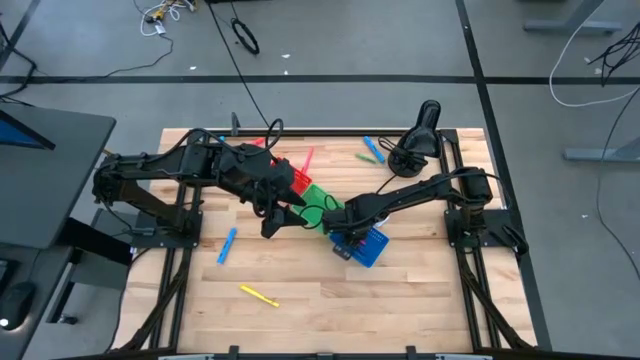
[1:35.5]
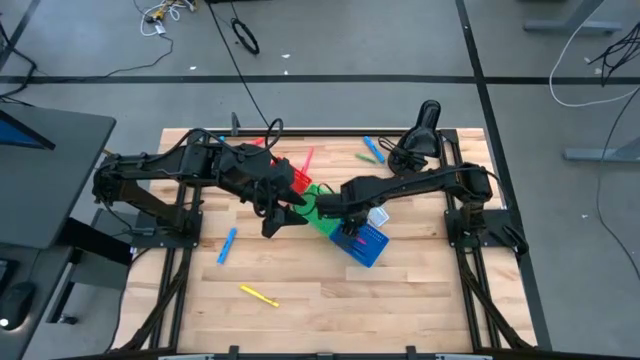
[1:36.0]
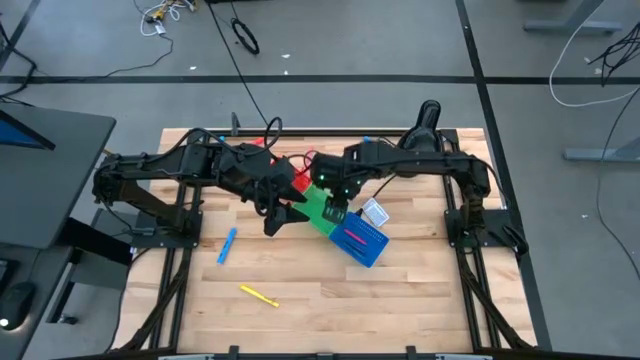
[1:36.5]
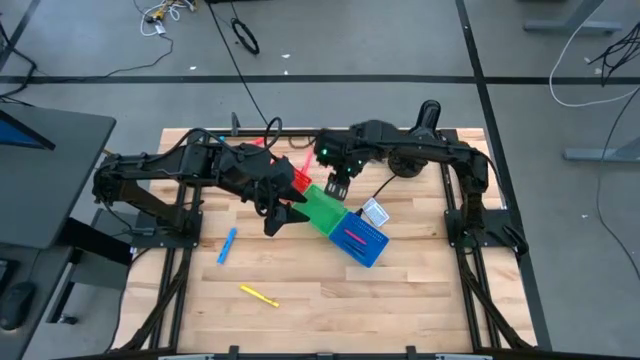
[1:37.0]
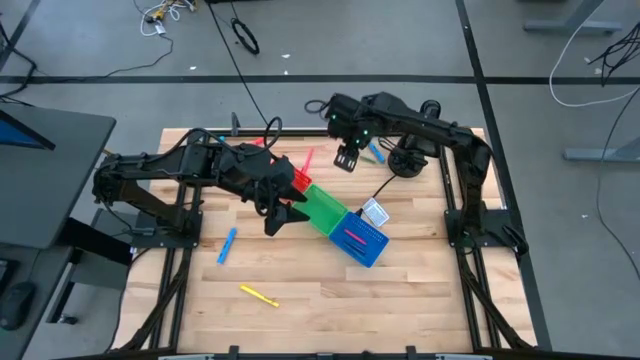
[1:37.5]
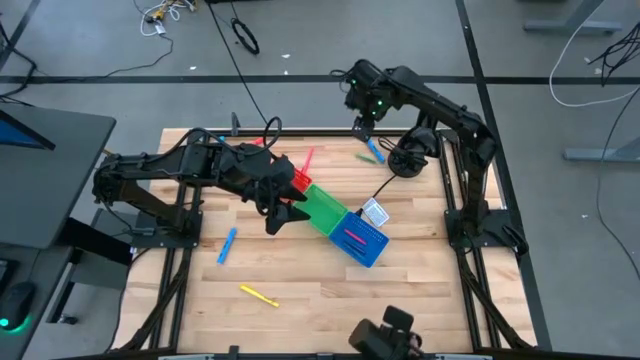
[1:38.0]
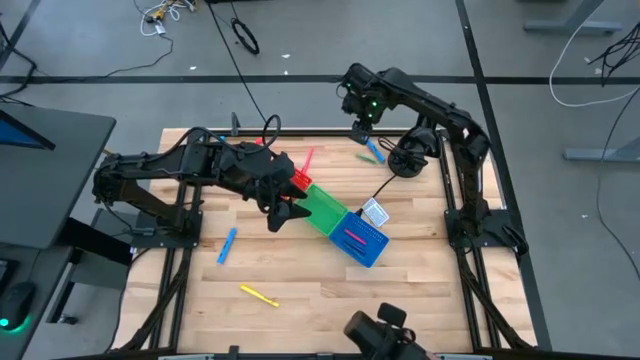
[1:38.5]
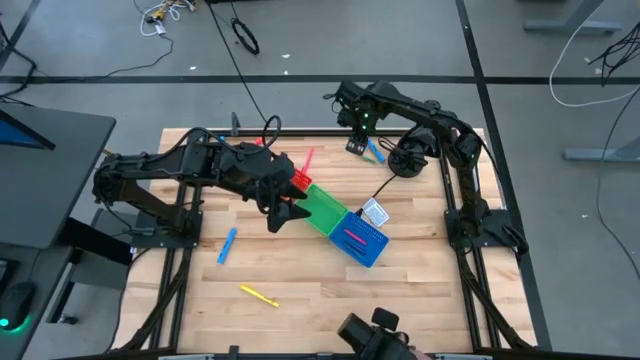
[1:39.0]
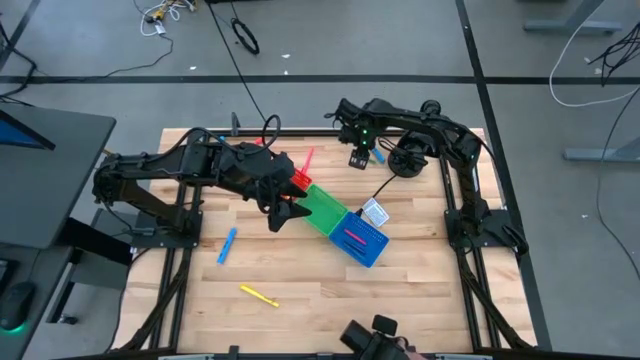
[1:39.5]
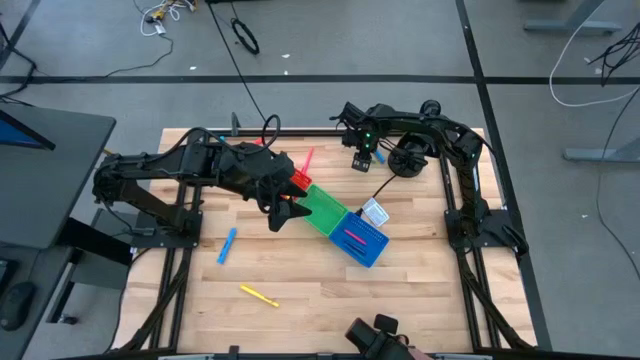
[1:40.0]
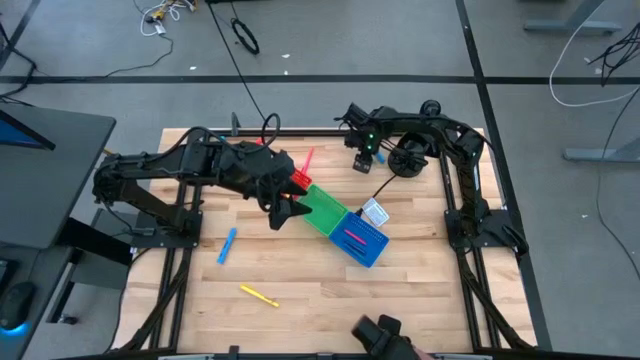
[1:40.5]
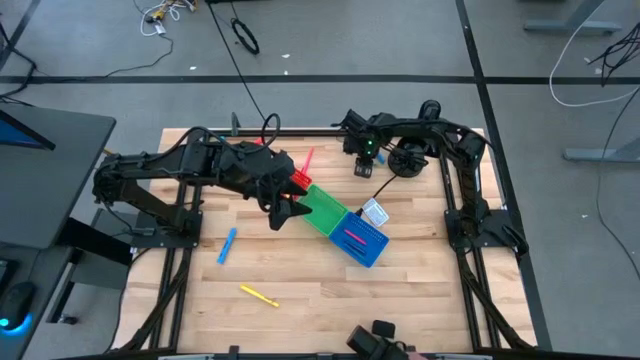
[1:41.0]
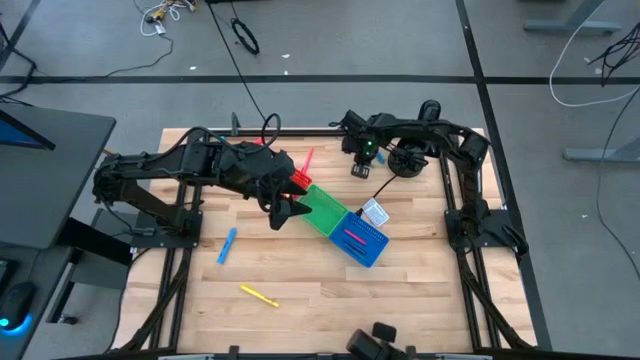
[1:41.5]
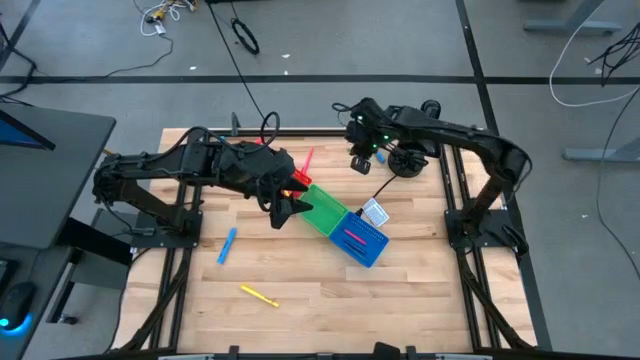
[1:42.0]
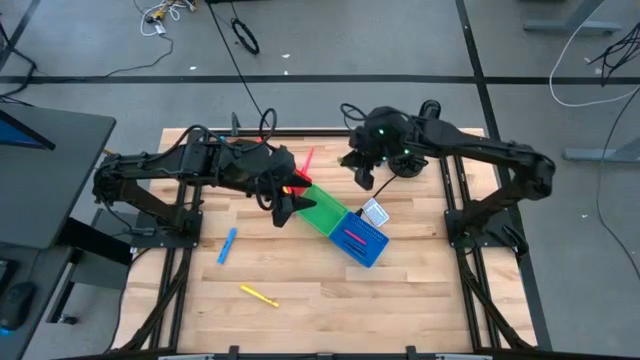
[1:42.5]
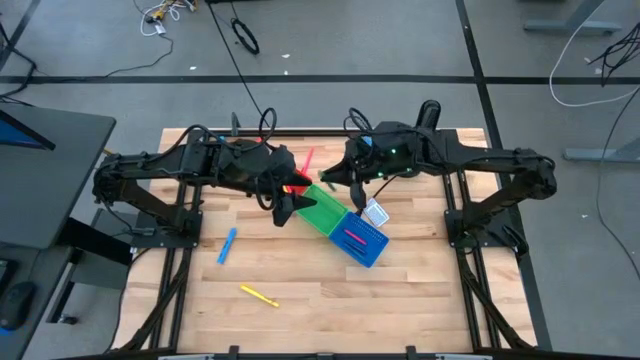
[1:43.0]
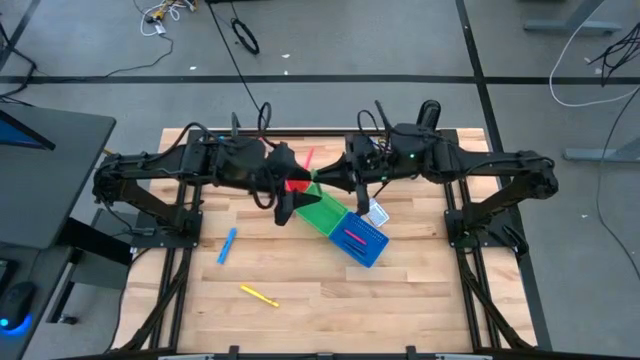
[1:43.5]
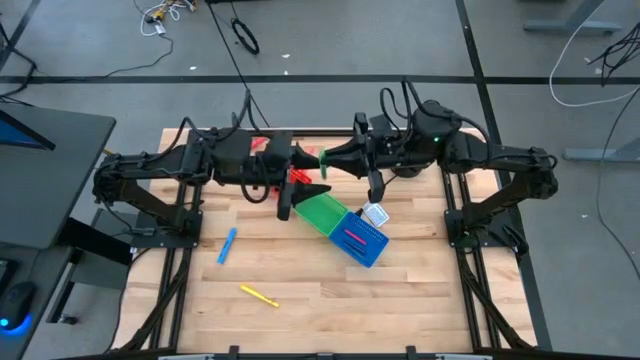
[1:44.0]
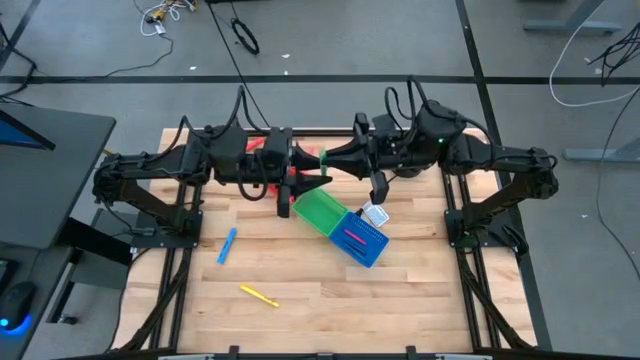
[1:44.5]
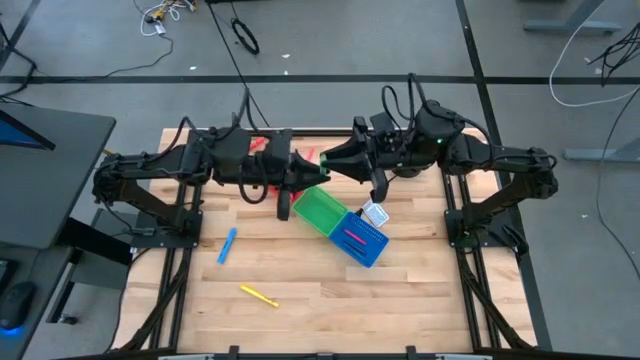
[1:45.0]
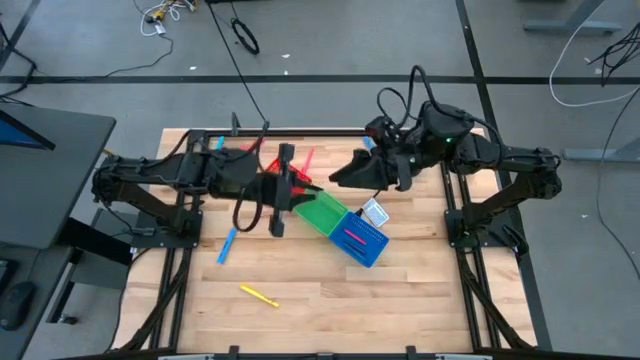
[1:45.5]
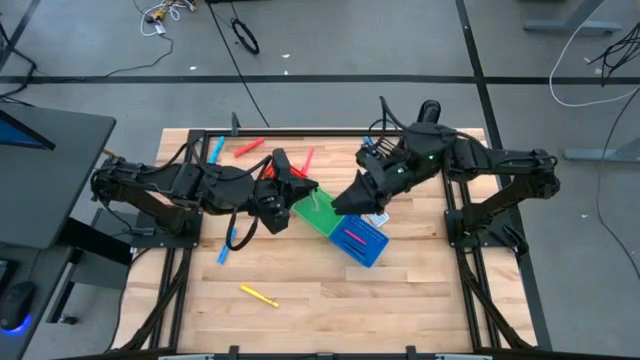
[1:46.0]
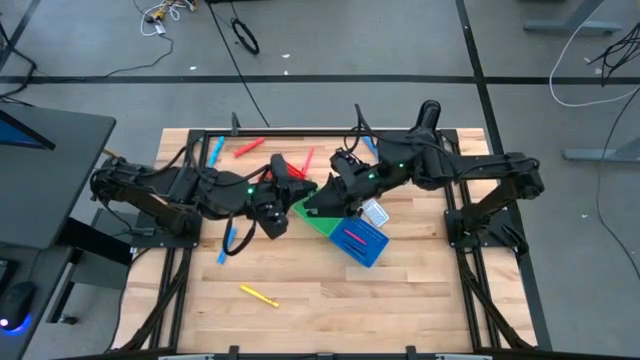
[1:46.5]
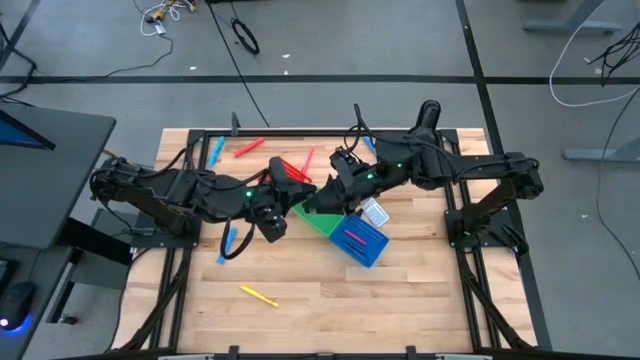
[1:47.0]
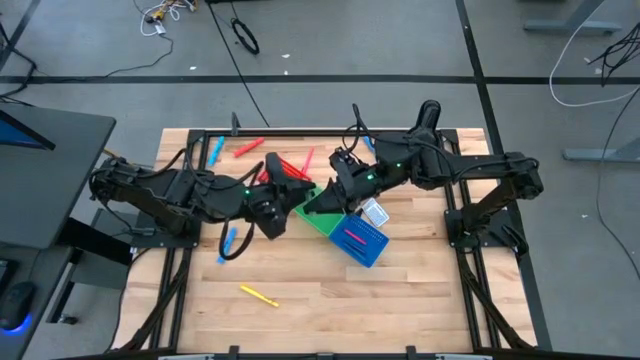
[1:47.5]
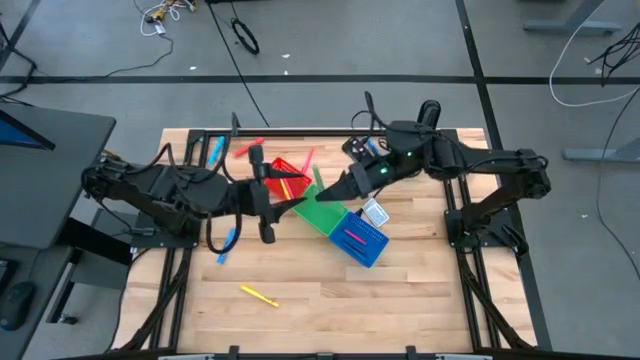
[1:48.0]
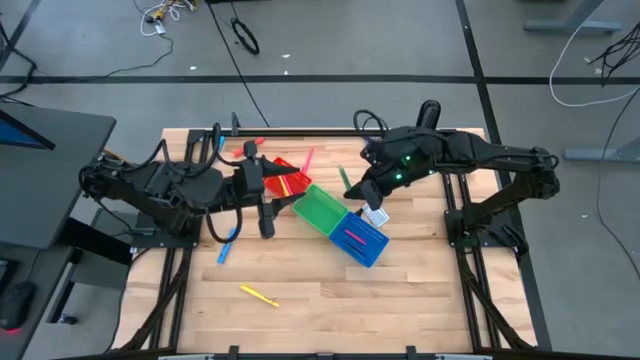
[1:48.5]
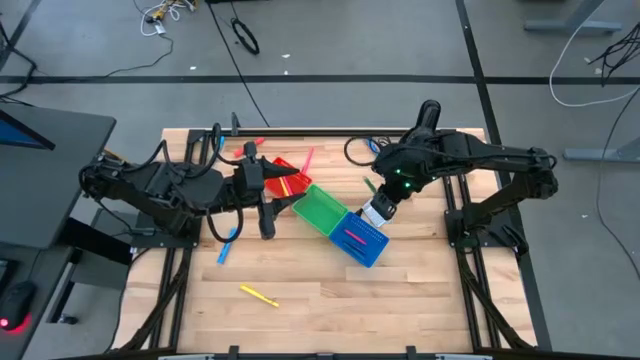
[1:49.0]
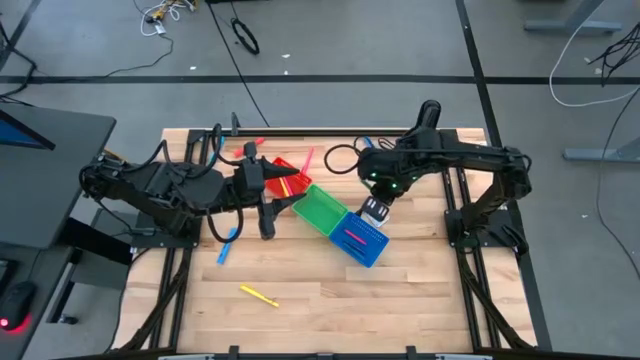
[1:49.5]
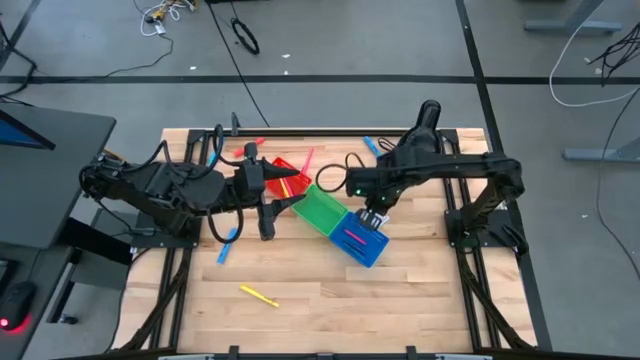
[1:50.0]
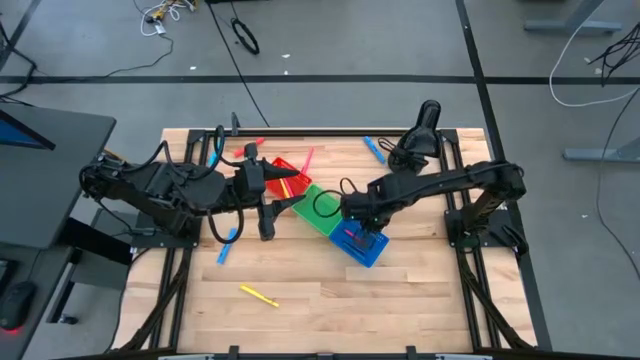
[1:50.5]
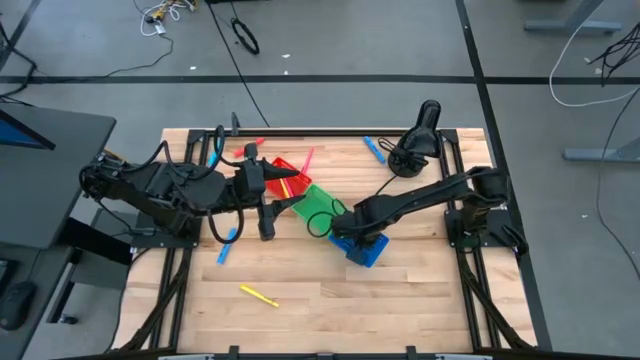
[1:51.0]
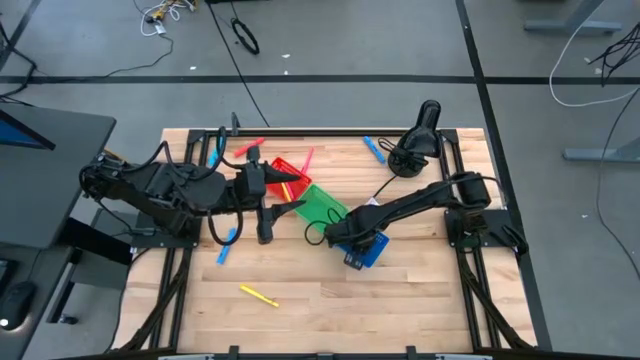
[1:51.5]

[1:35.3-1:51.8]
Task: Pick & Place Markers
Put the green pen into the blue bin

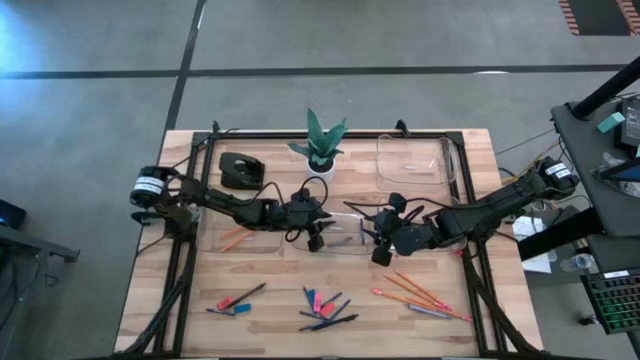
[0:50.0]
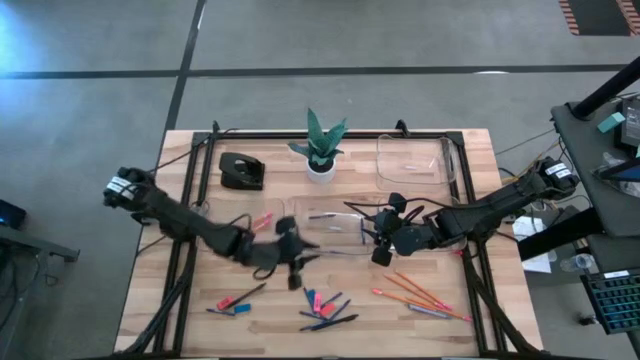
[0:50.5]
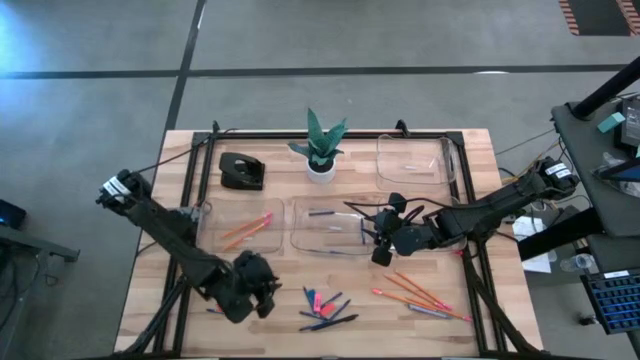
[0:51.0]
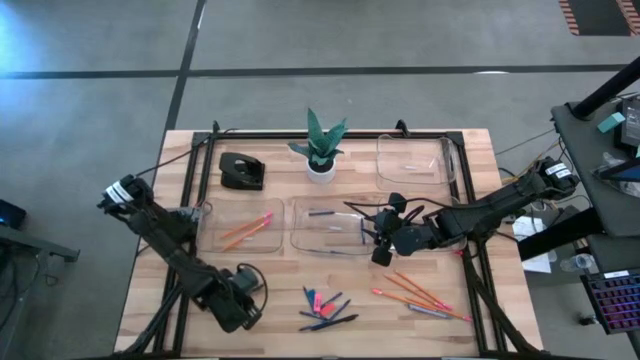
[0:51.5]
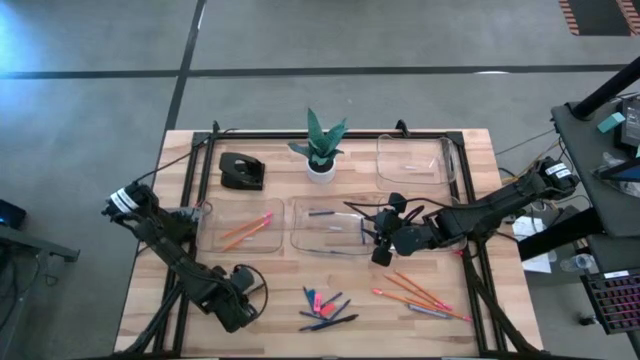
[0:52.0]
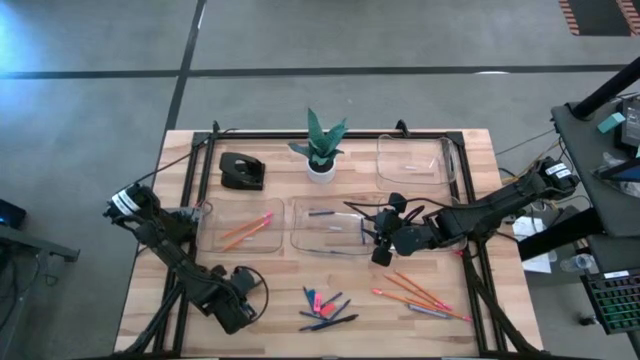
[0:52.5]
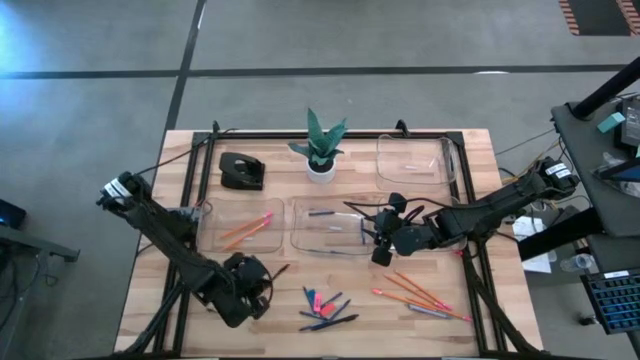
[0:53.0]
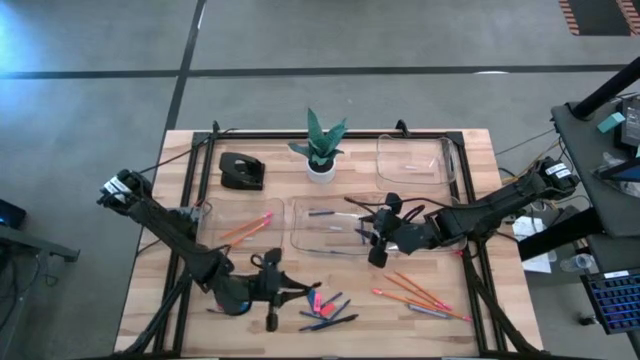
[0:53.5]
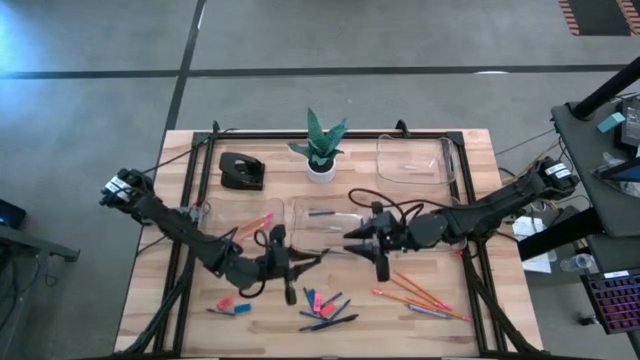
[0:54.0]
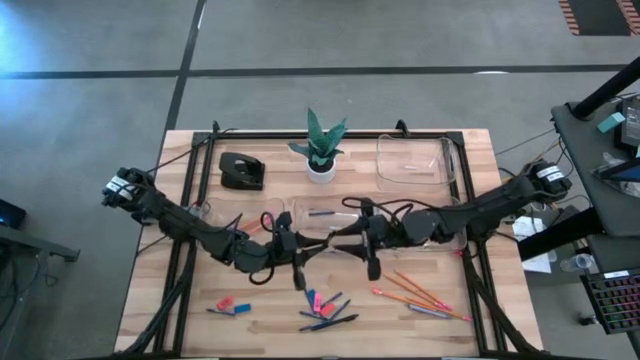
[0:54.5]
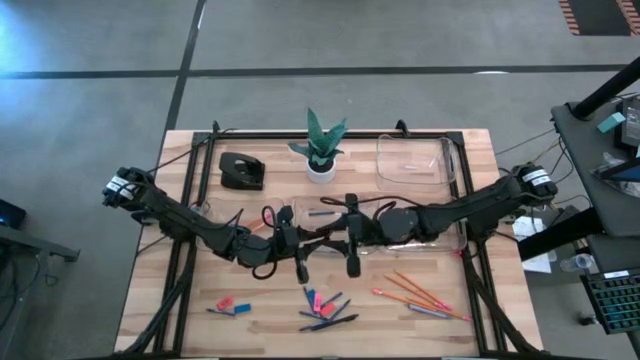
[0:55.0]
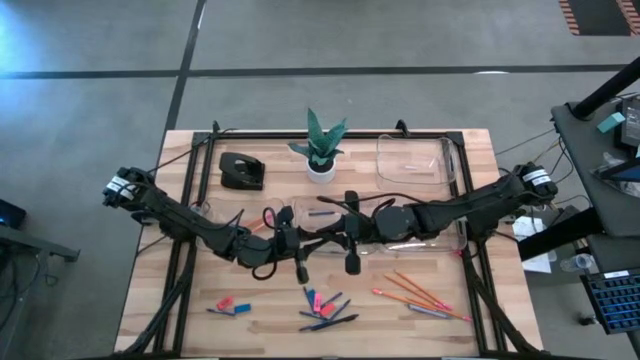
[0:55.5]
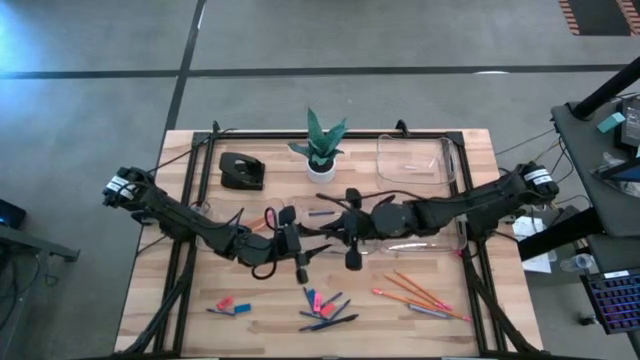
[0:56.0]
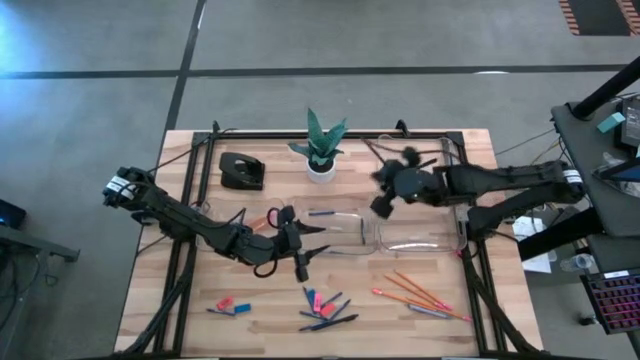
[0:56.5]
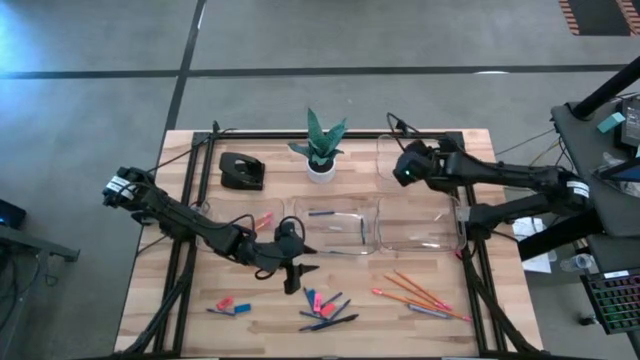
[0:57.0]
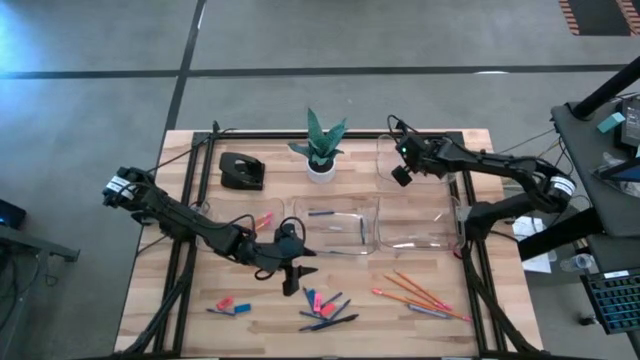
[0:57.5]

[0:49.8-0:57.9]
Task: Sort crayons/erasers/pens/pencils in bins
Put the black pen into the top right transparent bin
